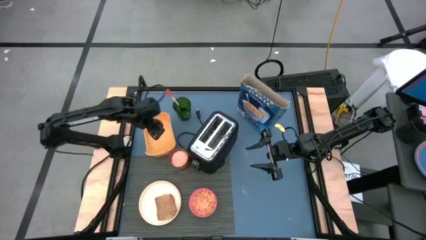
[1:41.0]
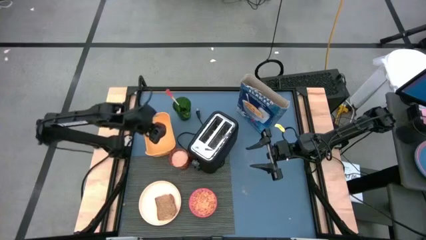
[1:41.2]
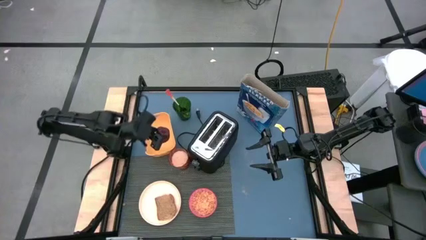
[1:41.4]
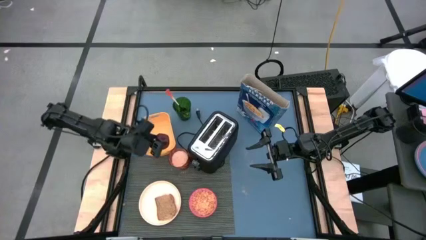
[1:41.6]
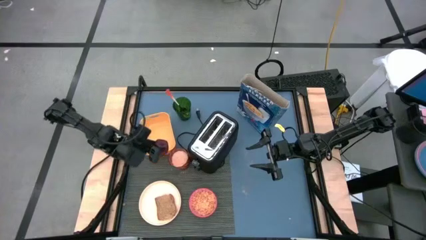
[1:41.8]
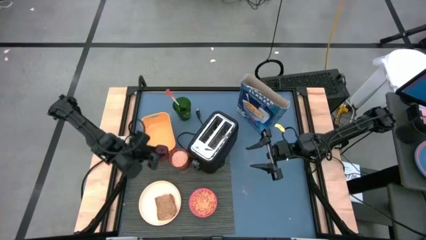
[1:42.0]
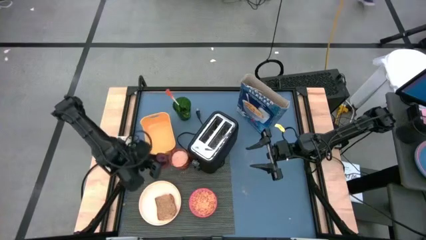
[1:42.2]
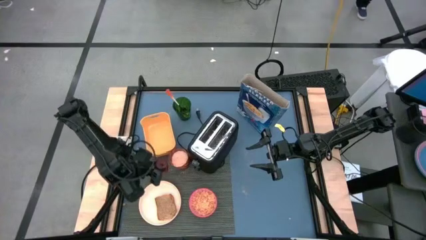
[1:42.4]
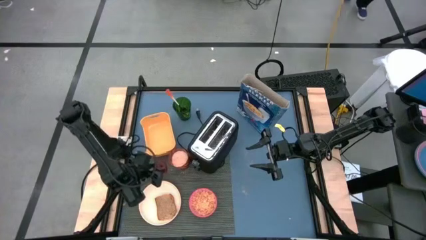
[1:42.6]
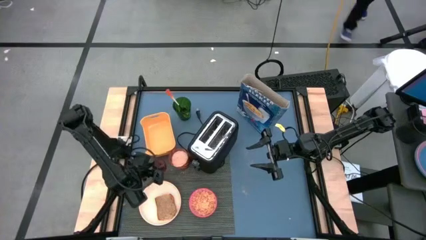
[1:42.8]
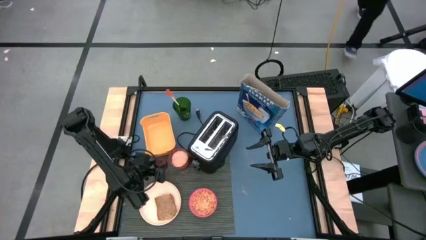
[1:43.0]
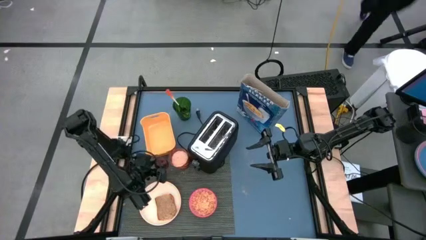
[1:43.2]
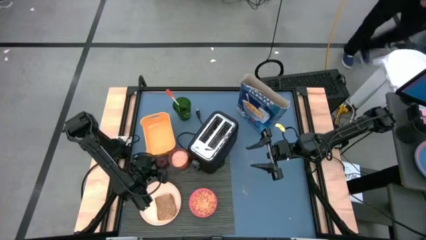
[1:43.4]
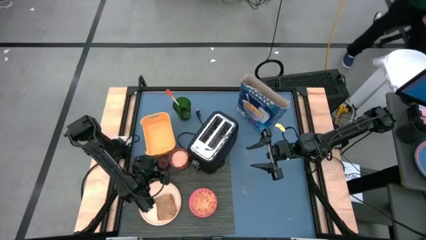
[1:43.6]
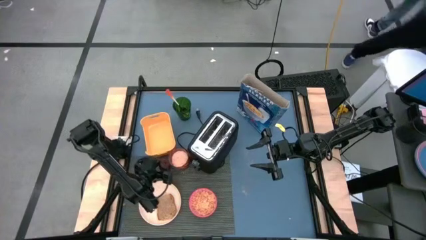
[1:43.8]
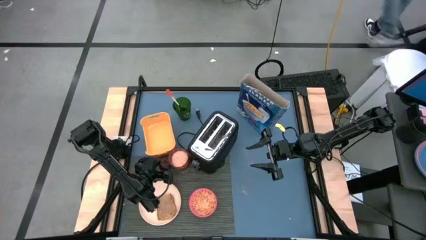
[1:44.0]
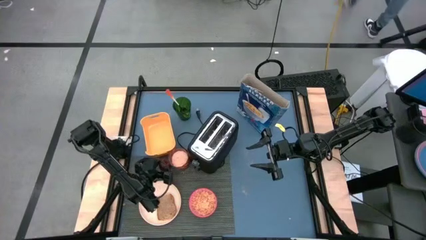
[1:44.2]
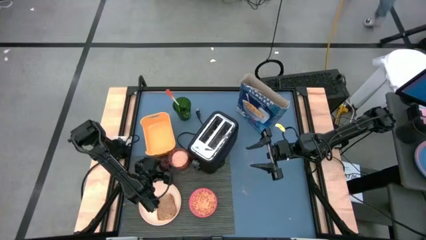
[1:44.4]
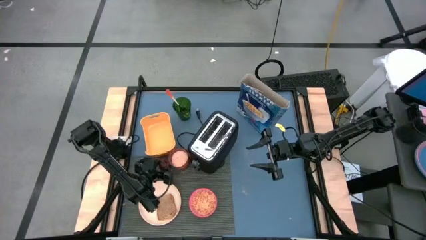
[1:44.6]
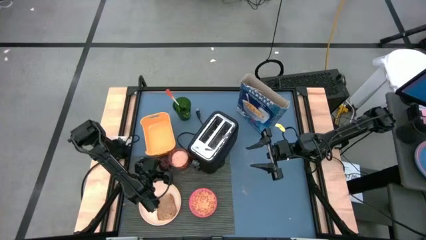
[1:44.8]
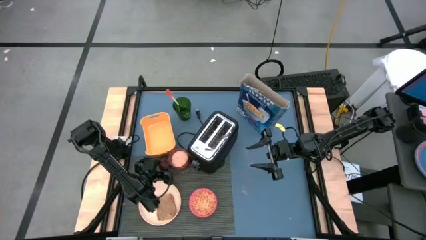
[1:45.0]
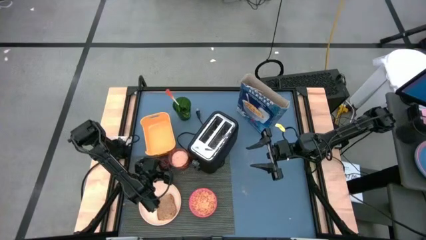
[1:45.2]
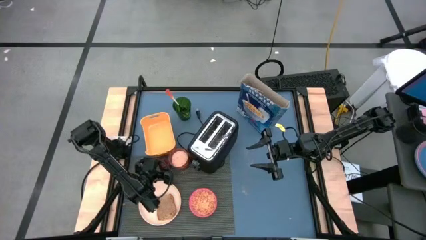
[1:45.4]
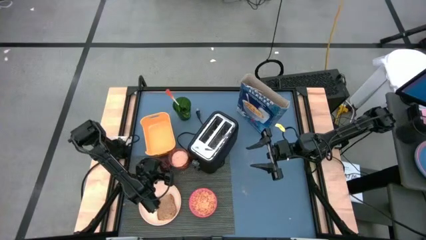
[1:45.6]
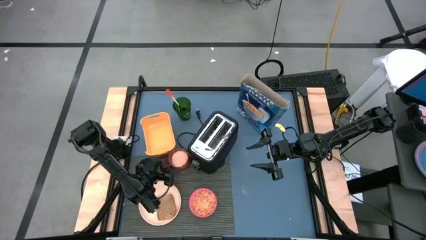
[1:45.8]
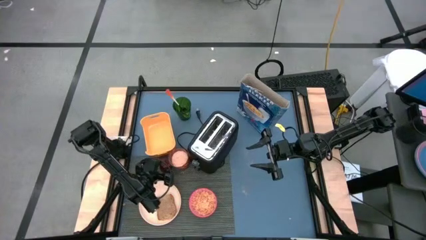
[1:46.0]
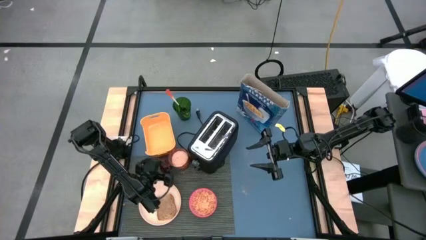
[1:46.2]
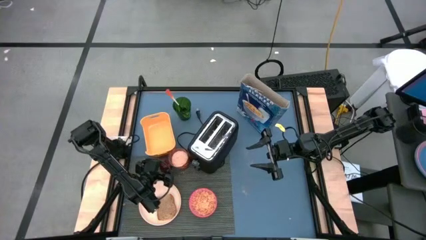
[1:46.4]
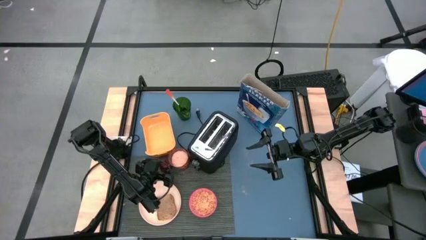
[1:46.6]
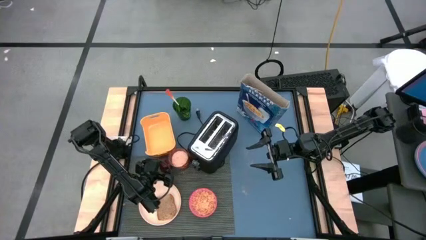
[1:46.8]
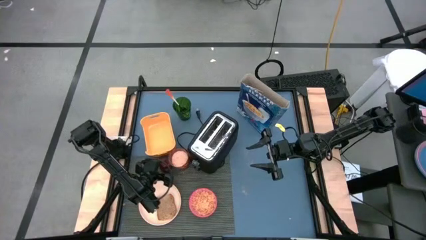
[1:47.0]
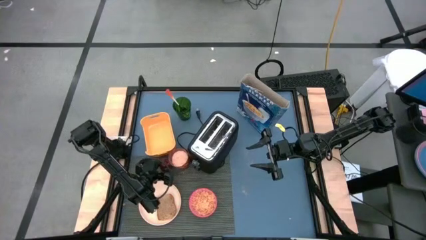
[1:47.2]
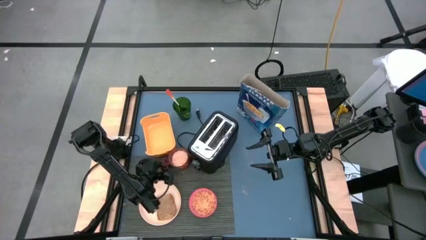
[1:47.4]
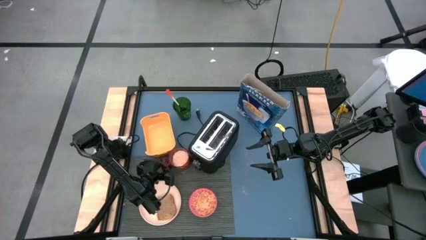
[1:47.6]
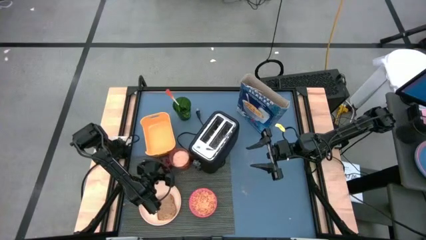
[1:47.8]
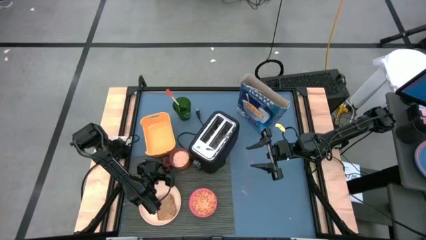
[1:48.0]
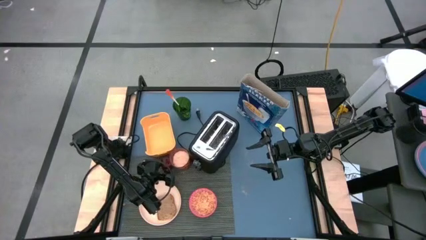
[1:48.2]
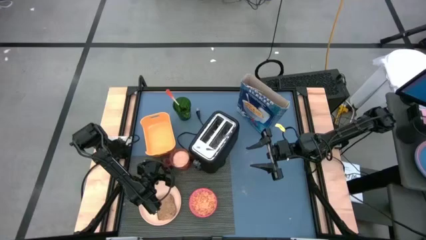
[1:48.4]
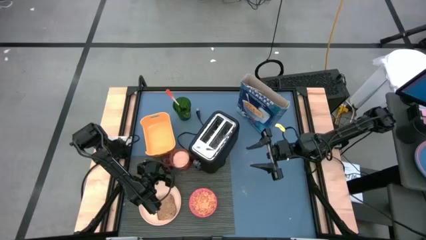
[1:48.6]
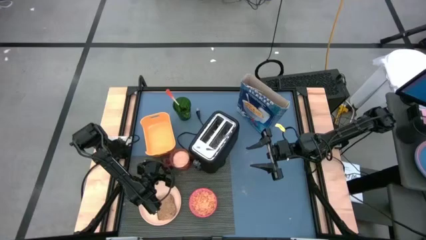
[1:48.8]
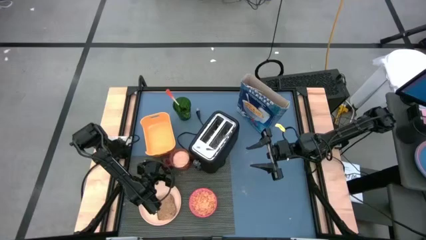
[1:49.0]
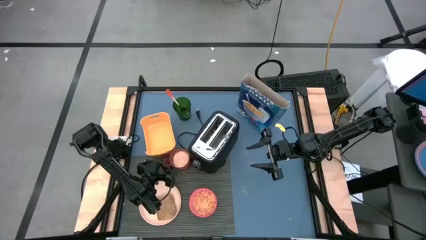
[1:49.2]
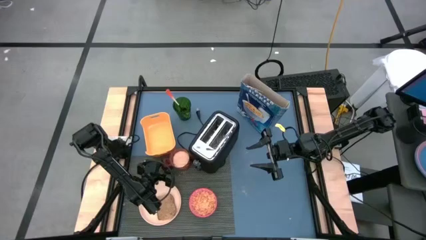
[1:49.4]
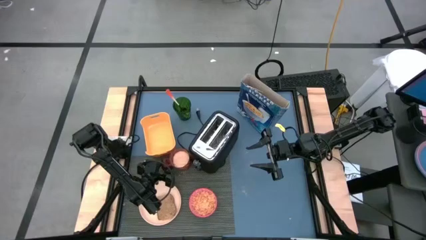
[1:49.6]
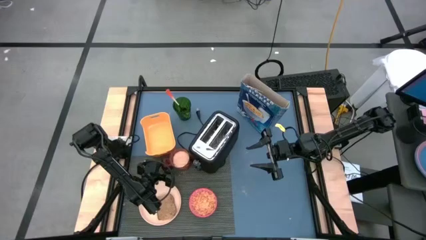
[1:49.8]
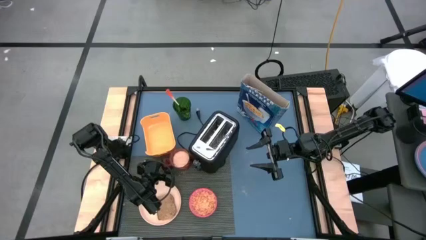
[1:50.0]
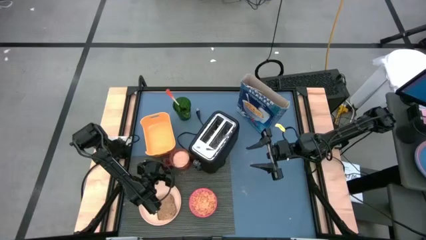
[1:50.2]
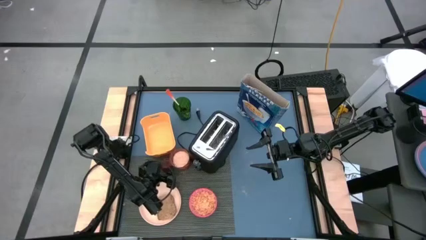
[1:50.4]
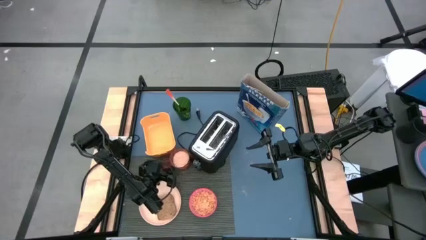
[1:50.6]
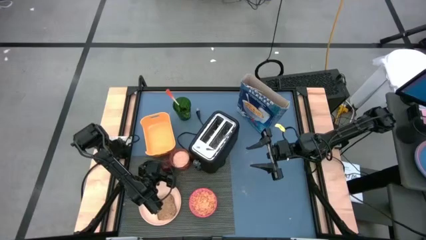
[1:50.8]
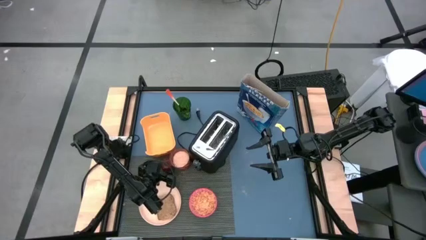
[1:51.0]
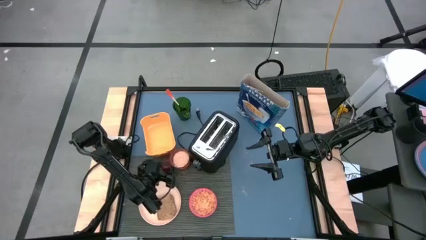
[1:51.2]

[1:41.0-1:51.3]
Task: Arrange a breakfast setting
Put the red apple on the gray tablemat to the top of the light orange plate

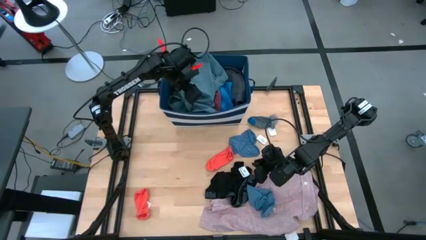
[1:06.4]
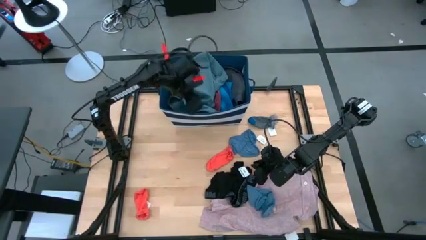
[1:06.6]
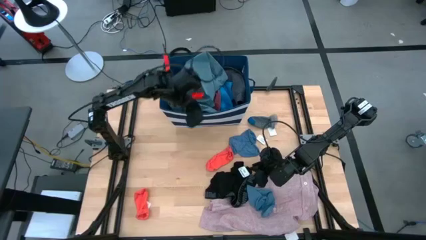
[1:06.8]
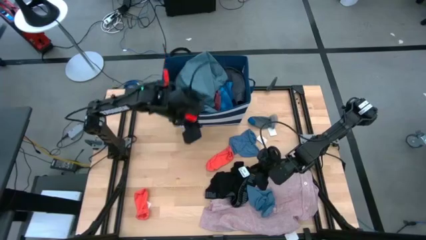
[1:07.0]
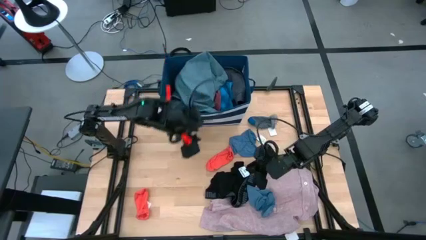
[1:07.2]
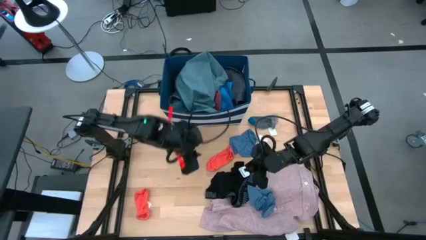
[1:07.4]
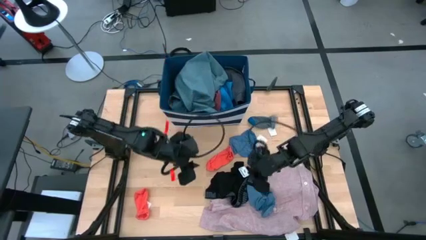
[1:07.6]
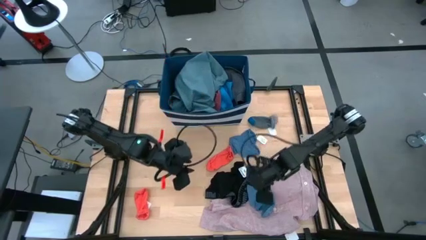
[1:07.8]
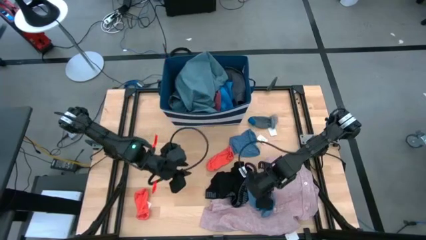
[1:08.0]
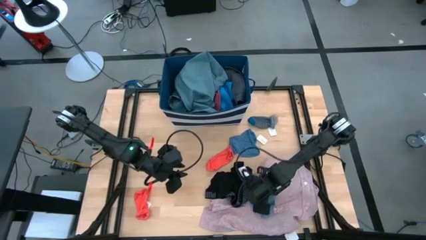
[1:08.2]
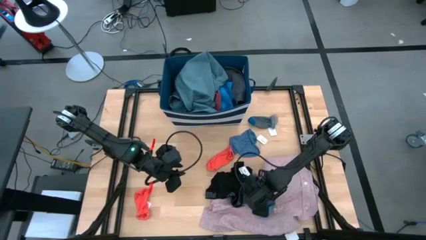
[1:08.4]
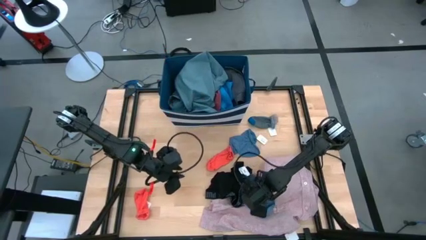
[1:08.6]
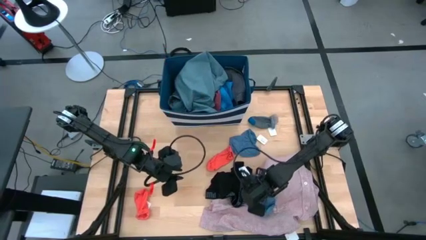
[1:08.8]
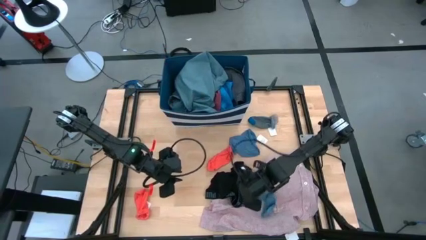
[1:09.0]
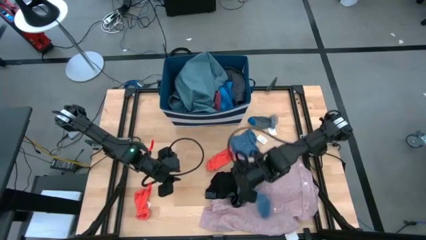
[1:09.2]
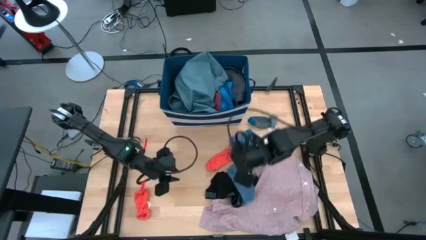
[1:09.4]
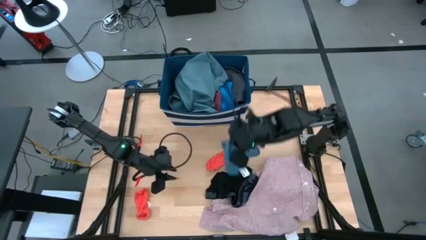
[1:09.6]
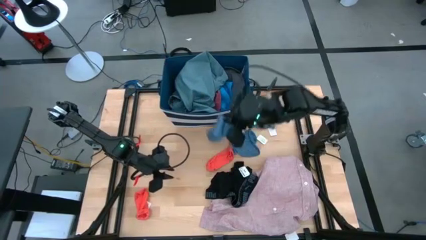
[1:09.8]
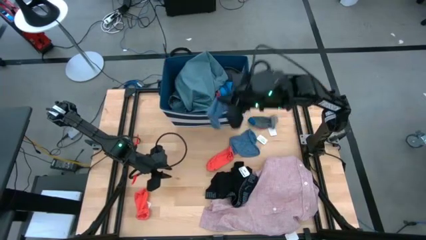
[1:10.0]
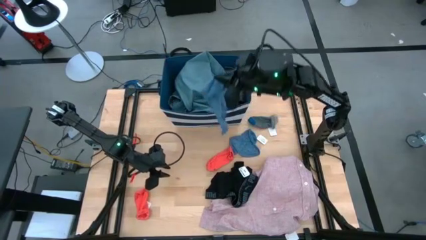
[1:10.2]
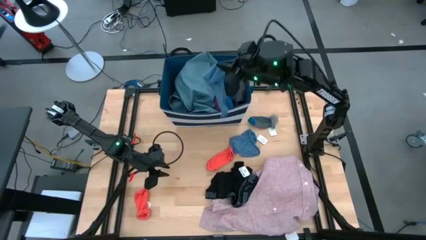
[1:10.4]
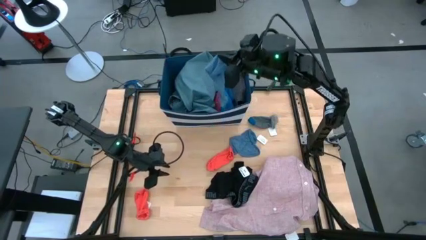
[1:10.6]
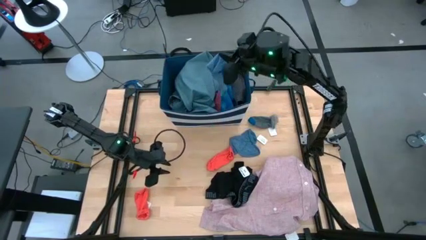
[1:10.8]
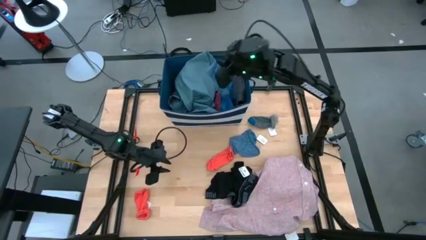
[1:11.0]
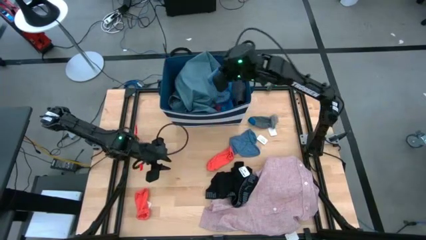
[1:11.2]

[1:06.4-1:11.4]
Task: Sort clothes
Put the bottom blue sock into the blue bin
